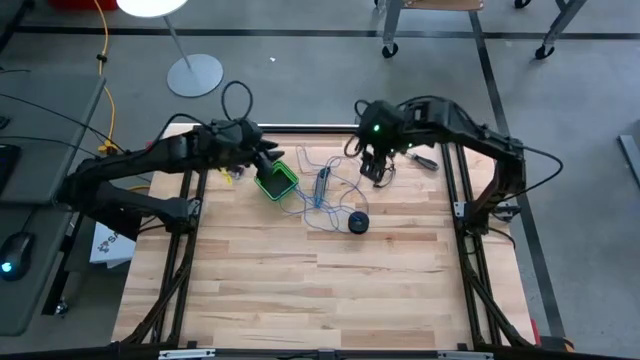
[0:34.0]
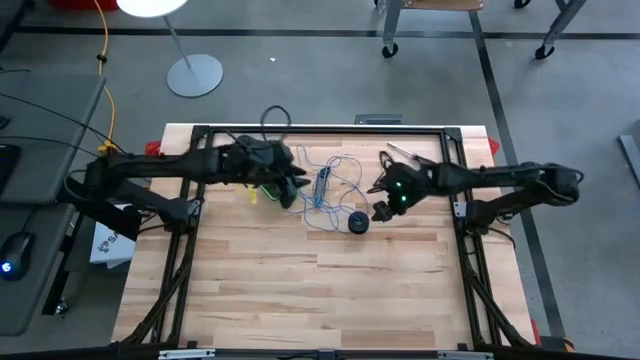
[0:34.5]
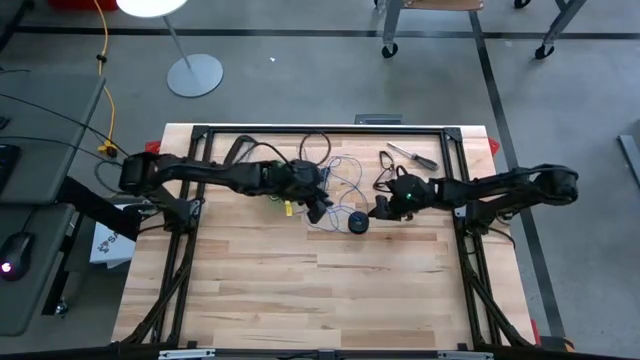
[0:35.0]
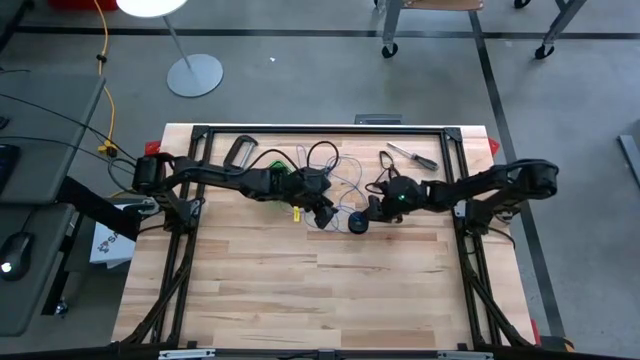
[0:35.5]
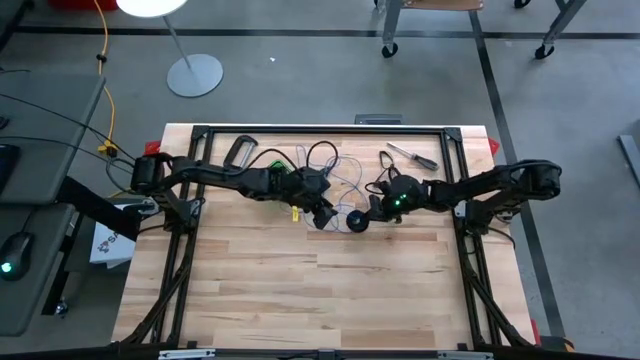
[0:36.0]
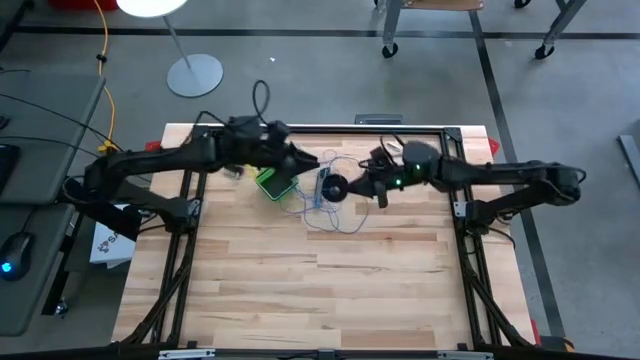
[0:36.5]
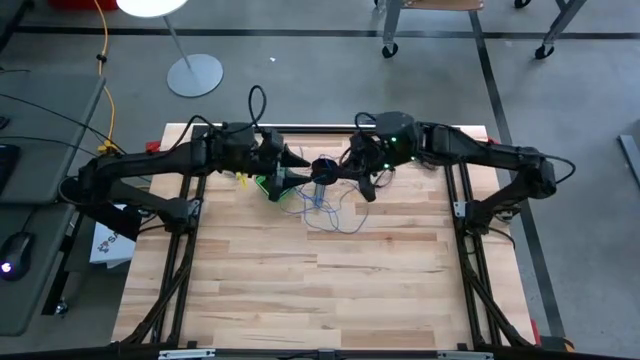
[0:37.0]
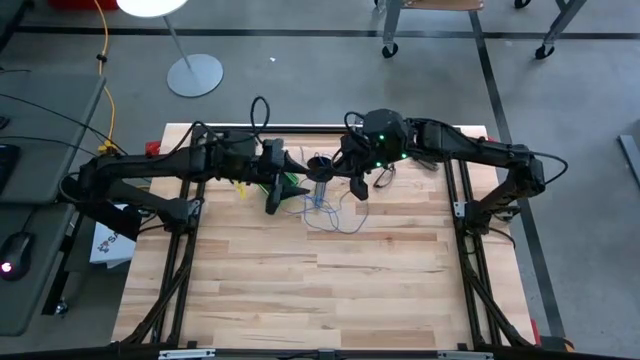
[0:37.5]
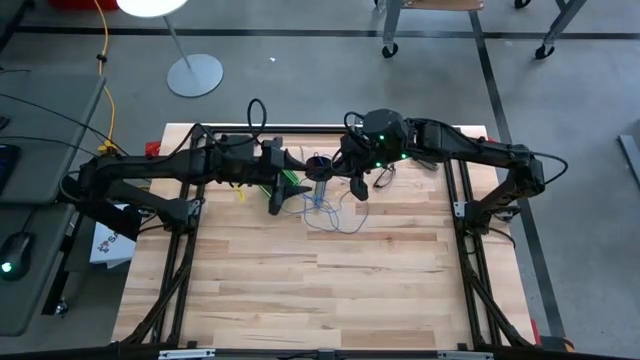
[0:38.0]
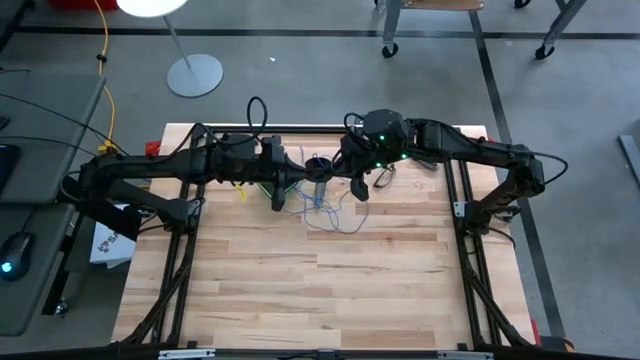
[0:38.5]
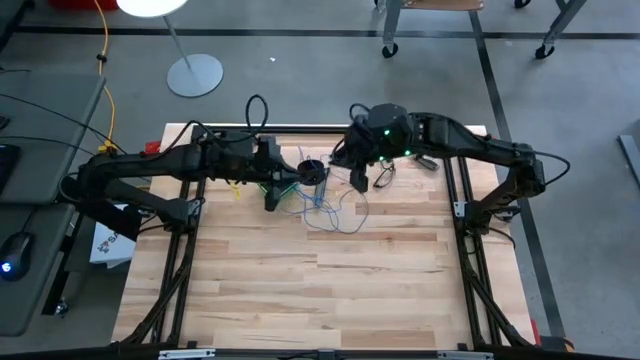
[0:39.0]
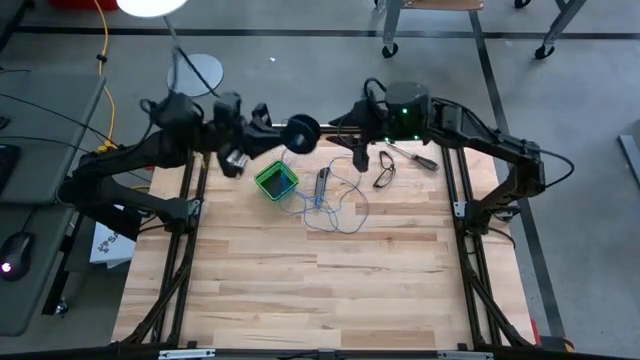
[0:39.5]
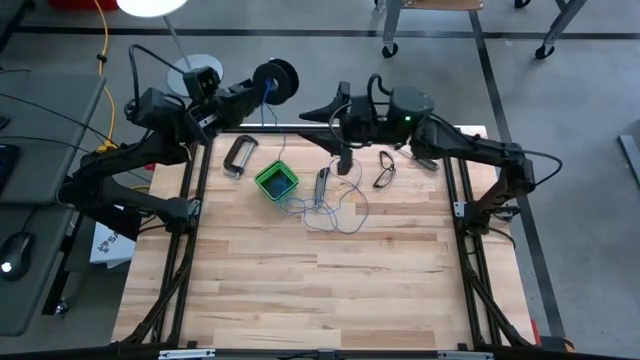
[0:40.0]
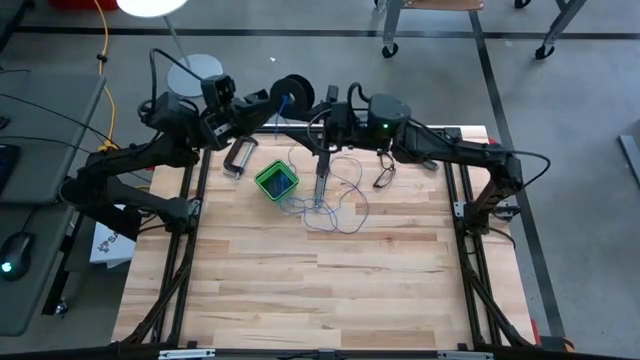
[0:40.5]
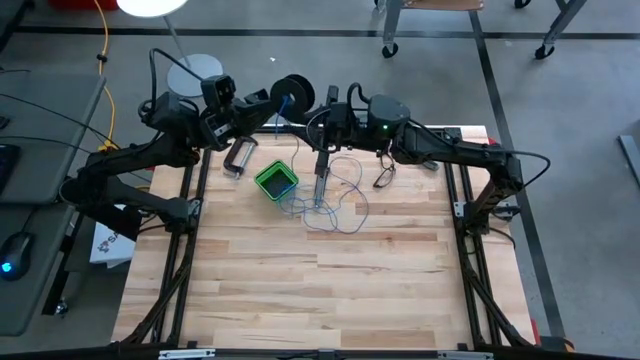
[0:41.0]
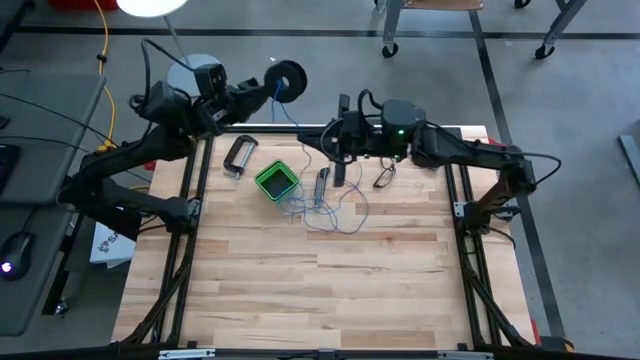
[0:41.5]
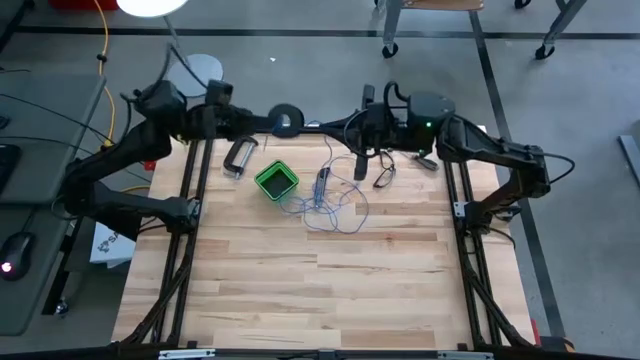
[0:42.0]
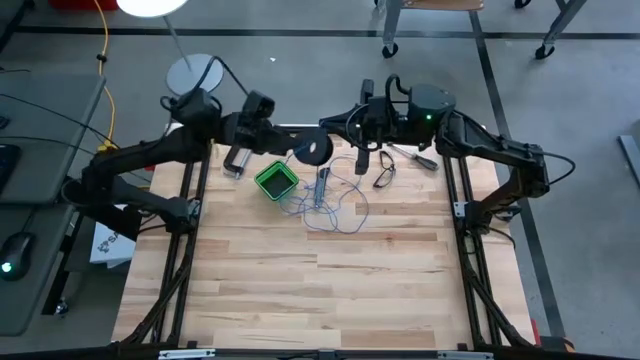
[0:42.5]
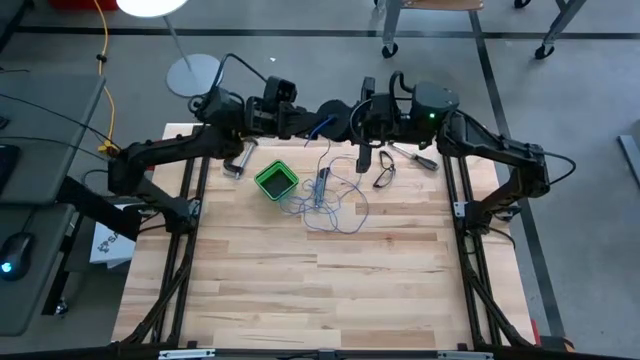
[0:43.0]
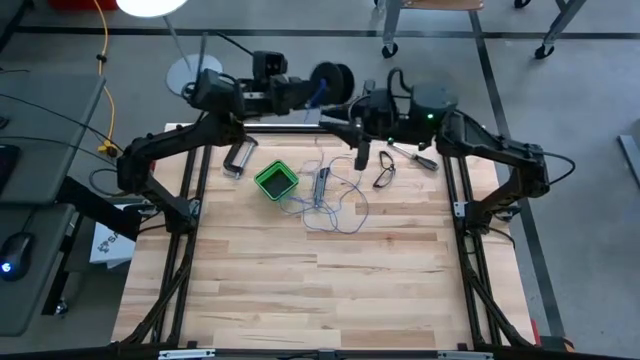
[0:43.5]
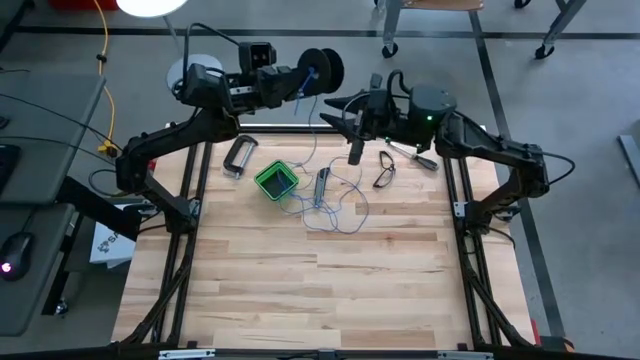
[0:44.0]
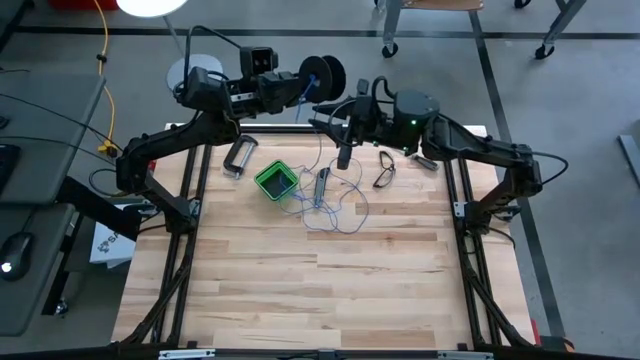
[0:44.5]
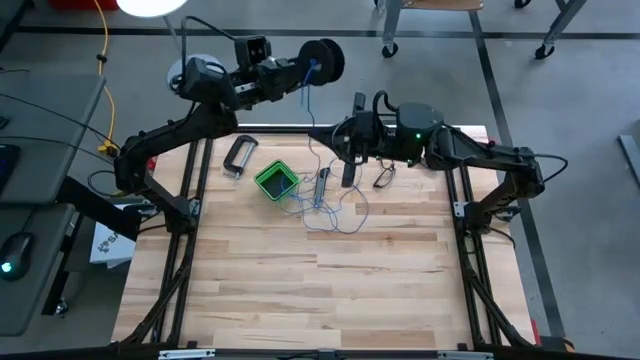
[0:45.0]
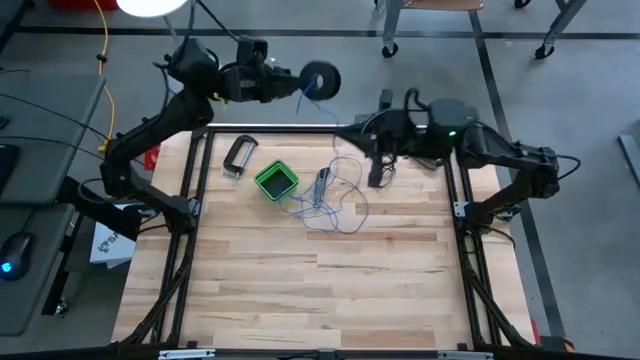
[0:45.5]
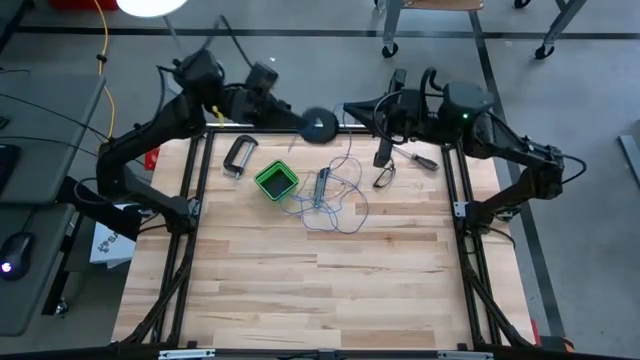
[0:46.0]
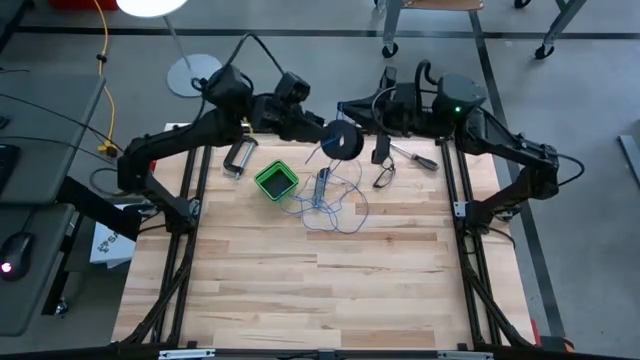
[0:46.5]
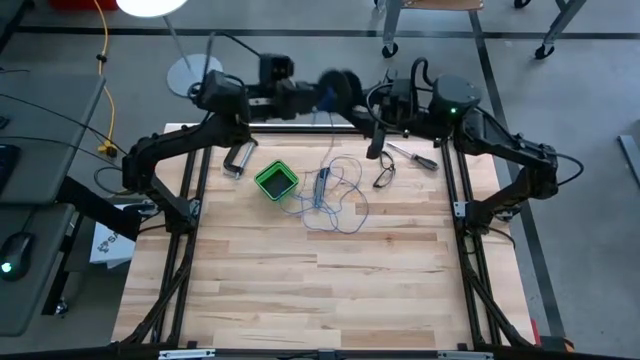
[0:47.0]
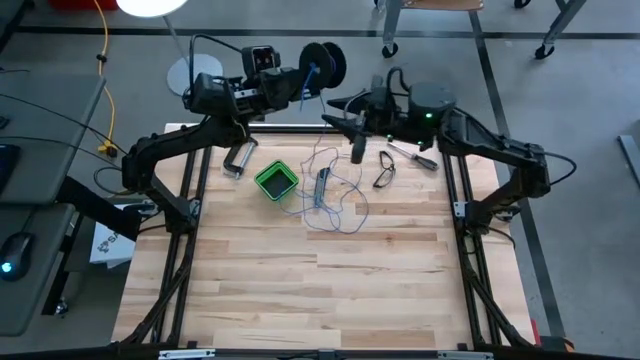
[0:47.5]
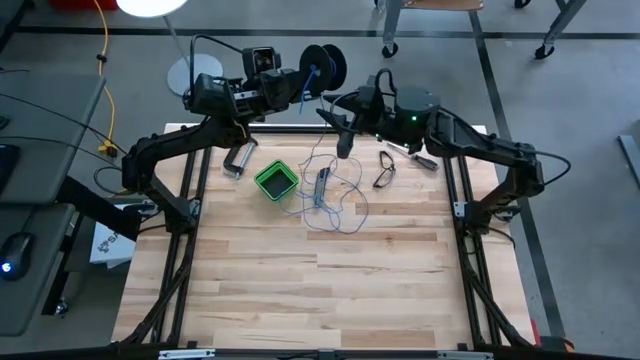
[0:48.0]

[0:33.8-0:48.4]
Task: Coil cords
Coil the blue wire onto the spool

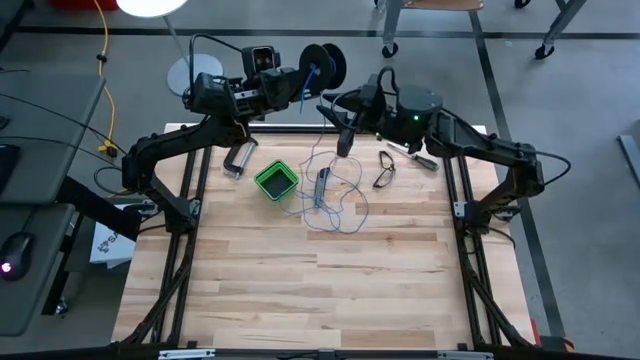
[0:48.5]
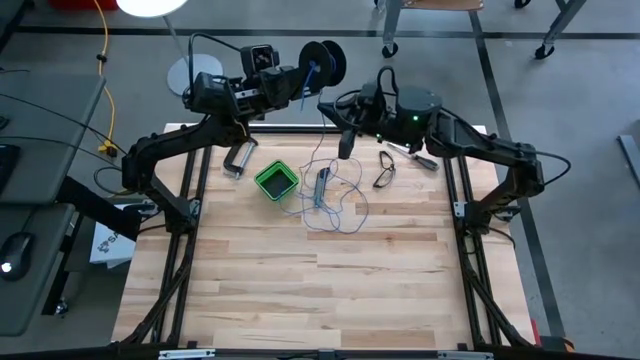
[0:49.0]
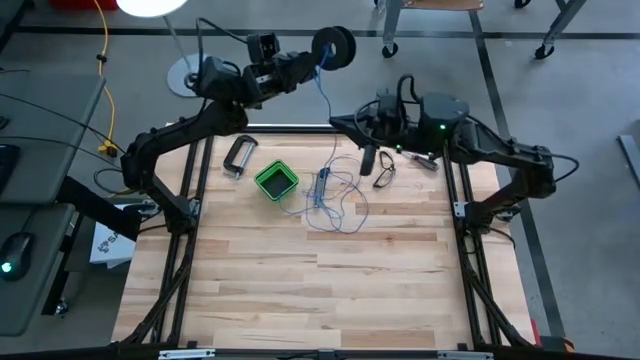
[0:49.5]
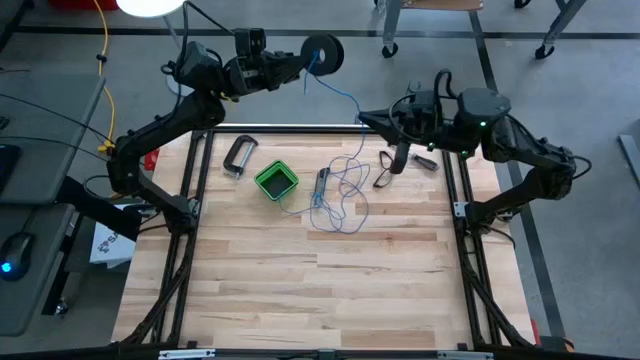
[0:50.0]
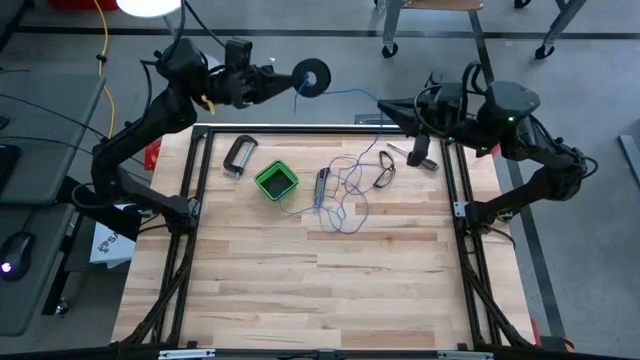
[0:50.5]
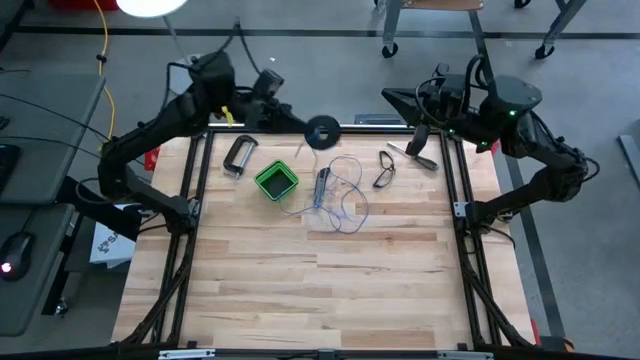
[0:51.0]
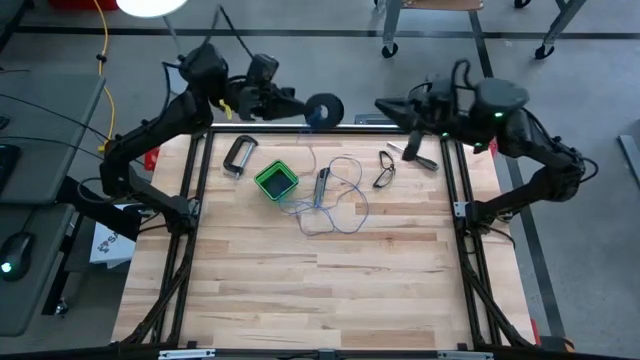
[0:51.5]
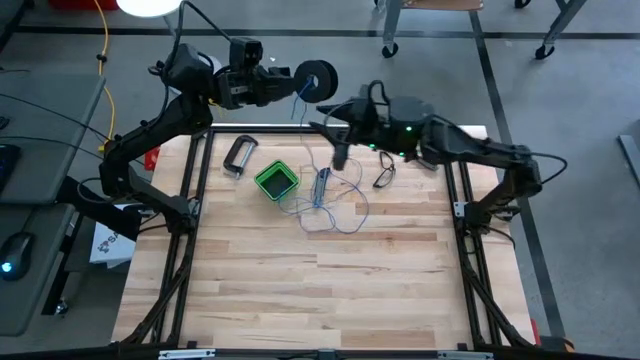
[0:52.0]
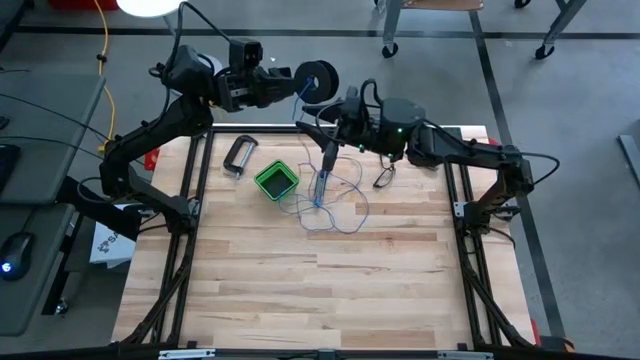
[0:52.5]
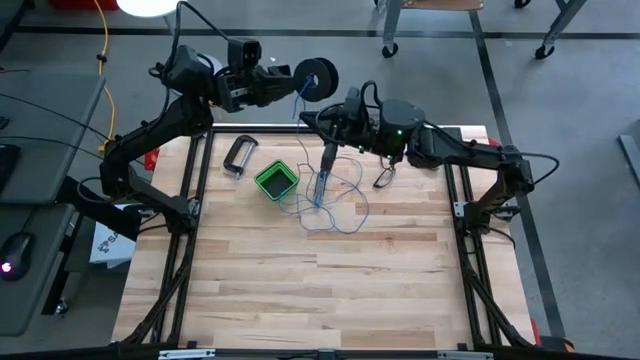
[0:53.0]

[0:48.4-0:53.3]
Coil the blue wire onto the spool

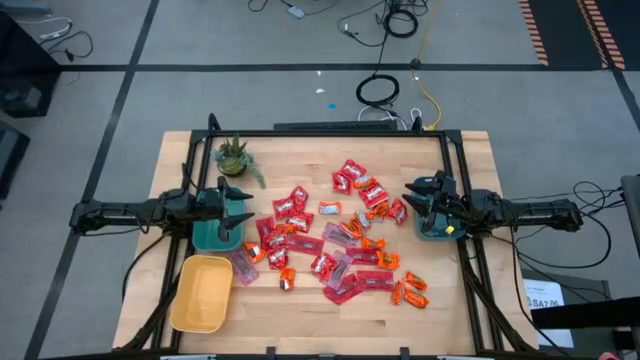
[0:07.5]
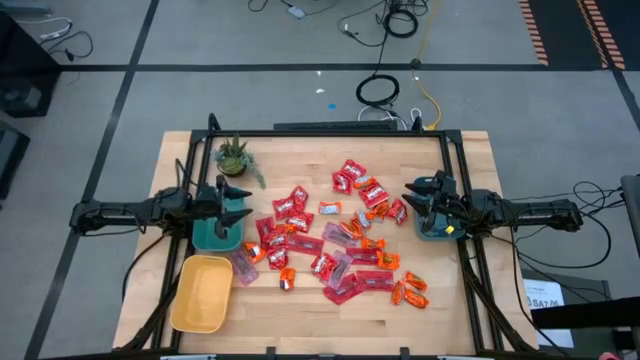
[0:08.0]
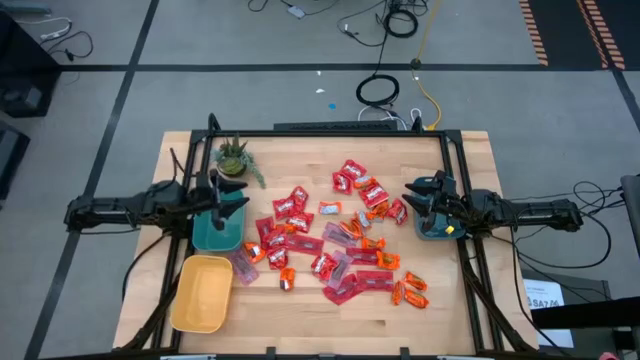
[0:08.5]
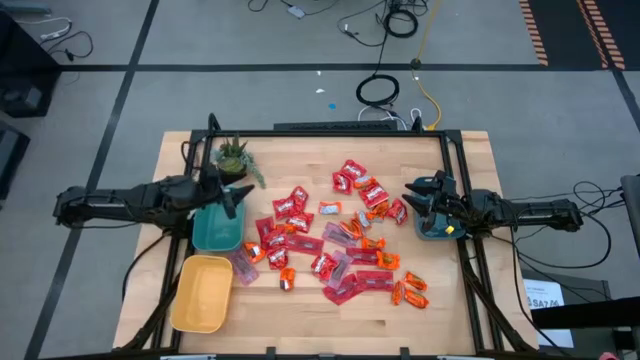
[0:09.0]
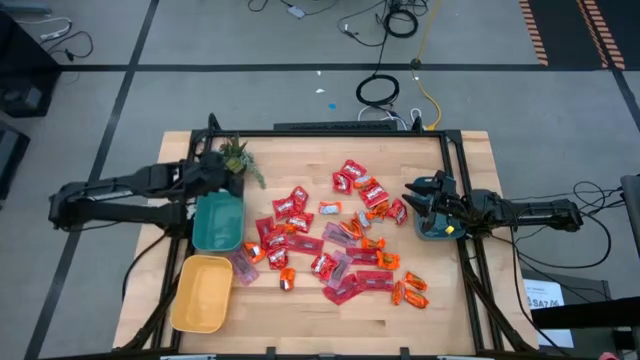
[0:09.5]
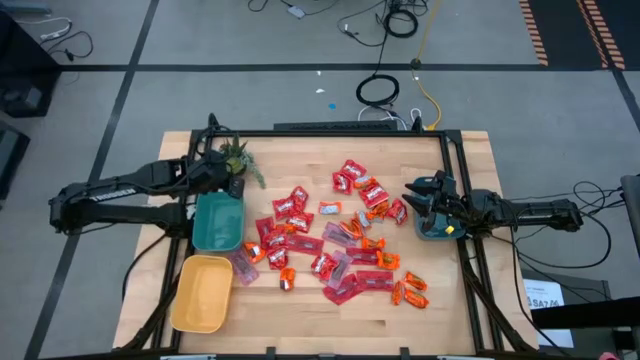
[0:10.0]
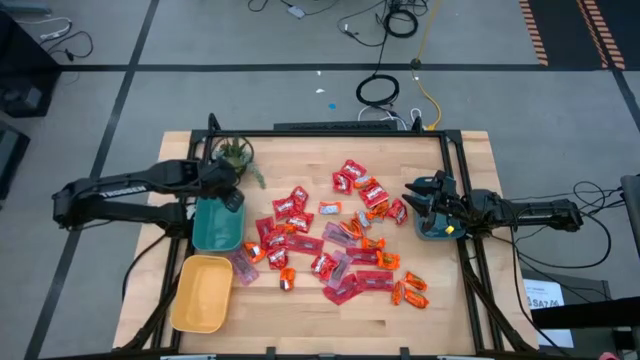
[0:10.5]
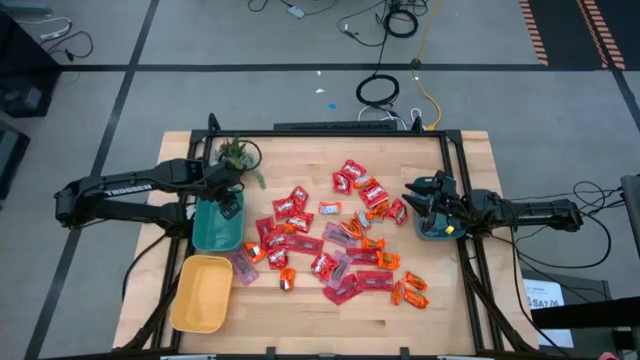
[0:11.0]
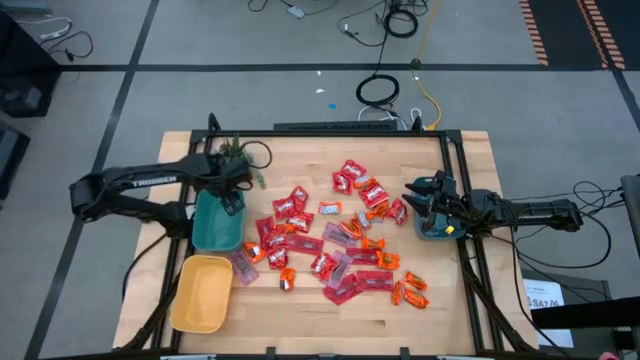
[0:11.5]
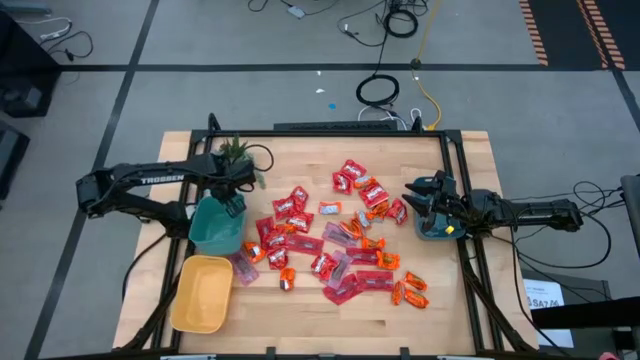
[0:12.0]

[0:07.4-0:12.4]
Task: Sort candy
Move the green bin to the upper middle
